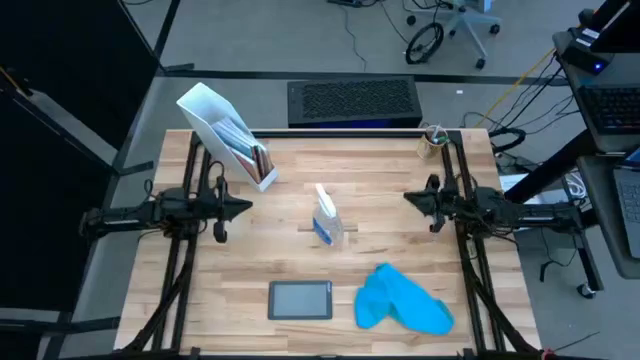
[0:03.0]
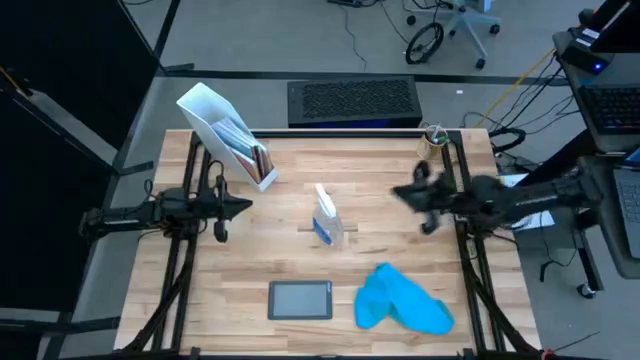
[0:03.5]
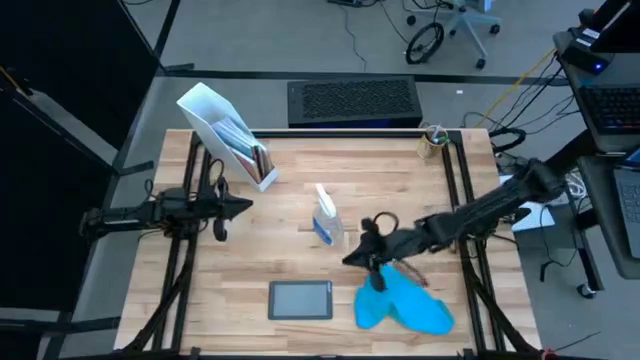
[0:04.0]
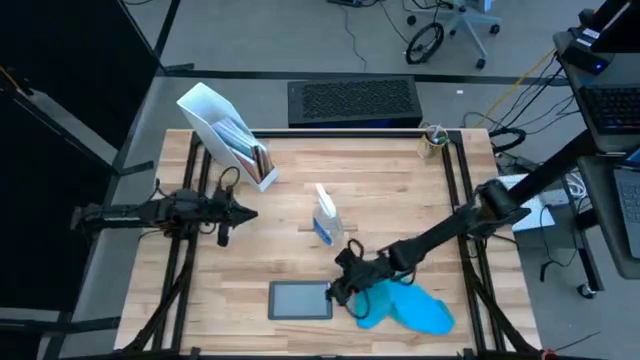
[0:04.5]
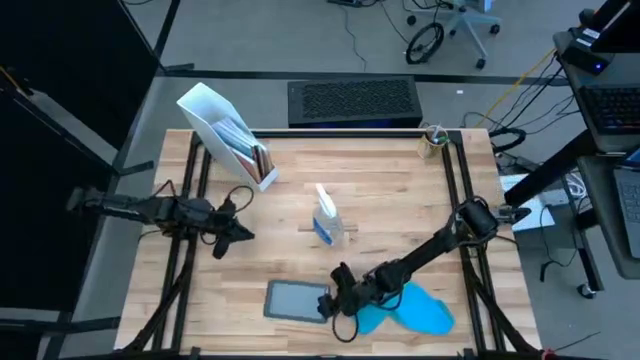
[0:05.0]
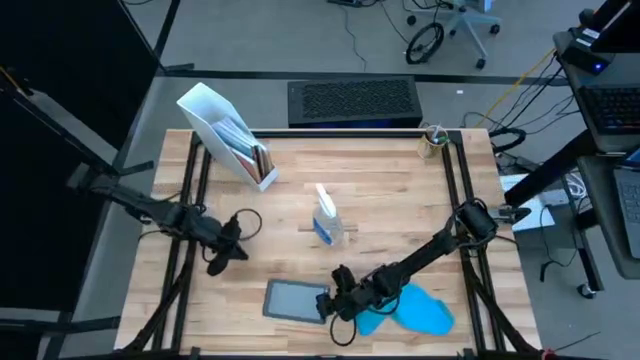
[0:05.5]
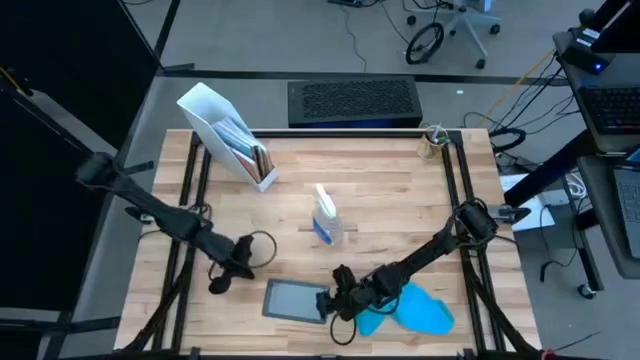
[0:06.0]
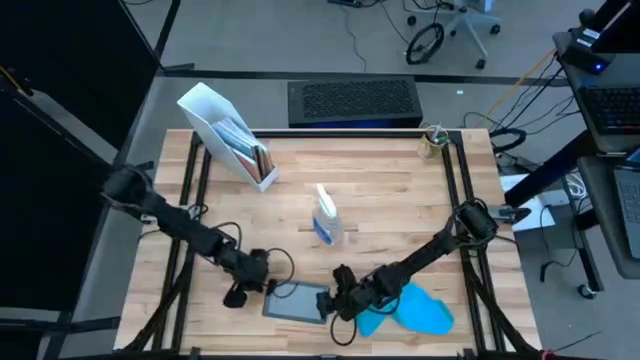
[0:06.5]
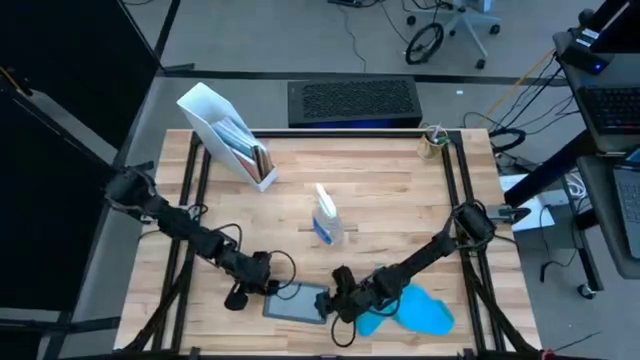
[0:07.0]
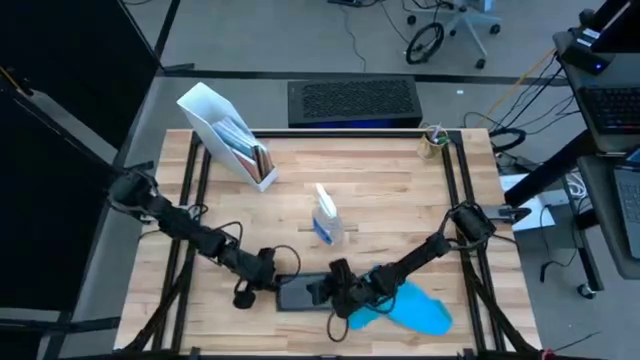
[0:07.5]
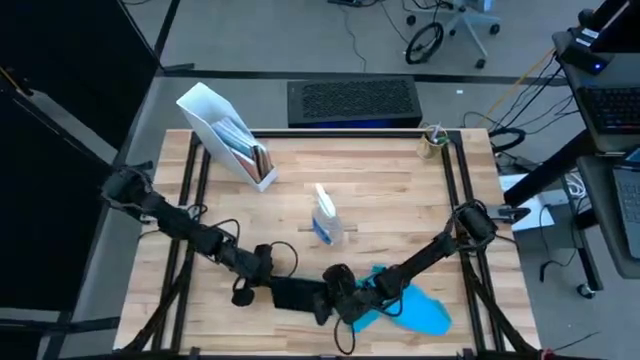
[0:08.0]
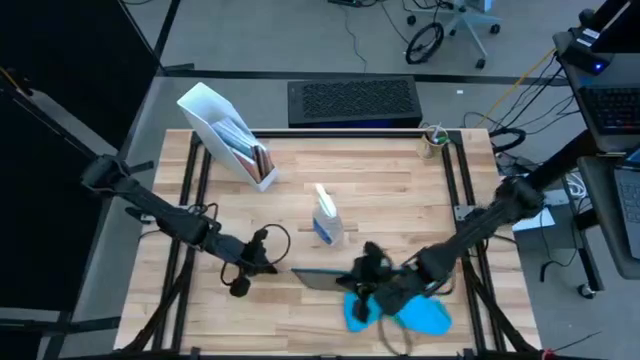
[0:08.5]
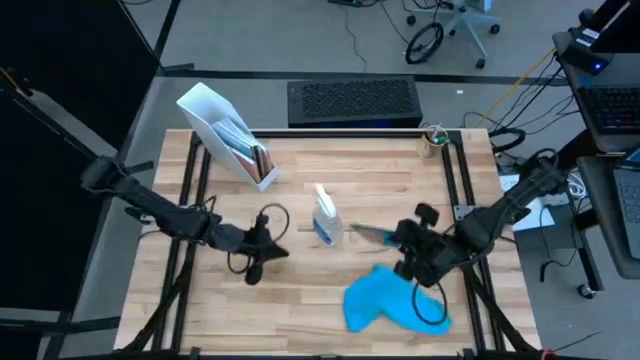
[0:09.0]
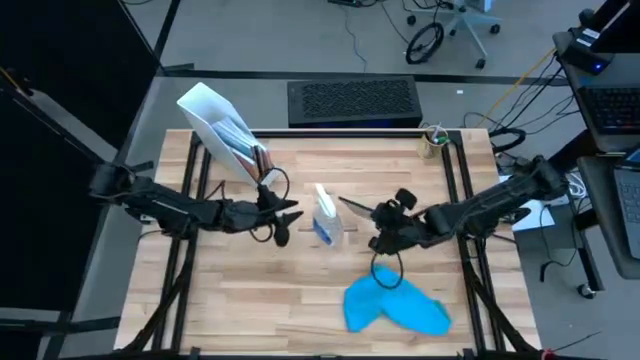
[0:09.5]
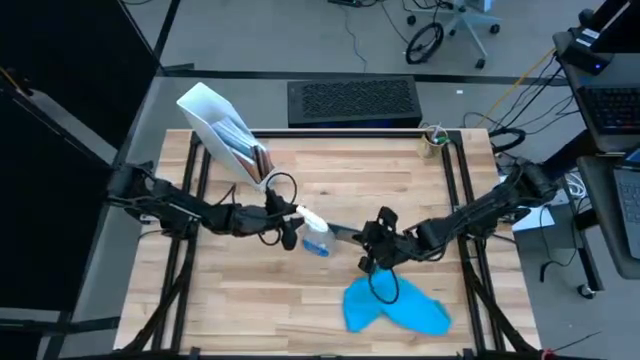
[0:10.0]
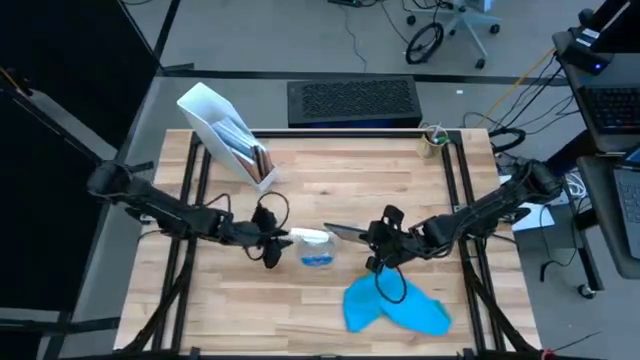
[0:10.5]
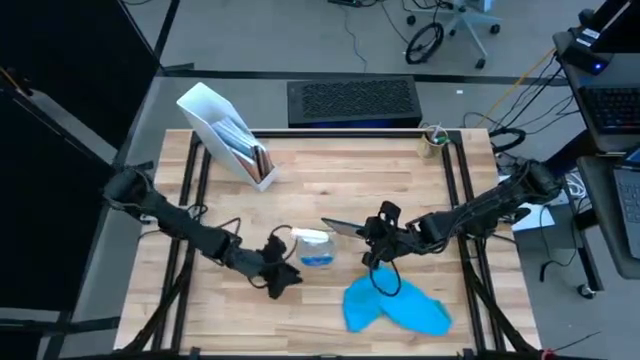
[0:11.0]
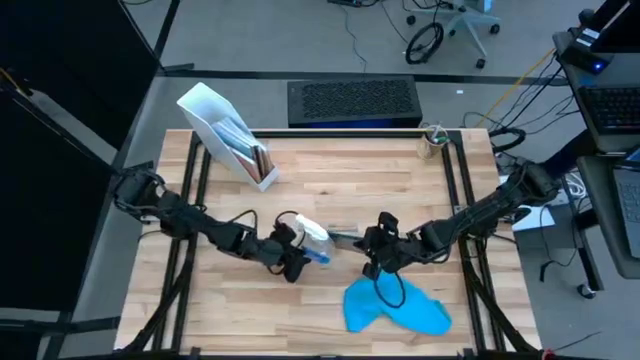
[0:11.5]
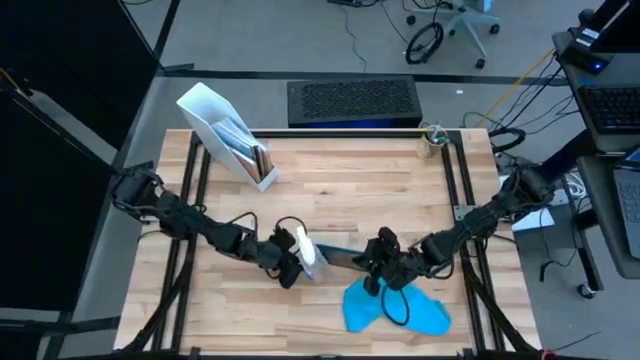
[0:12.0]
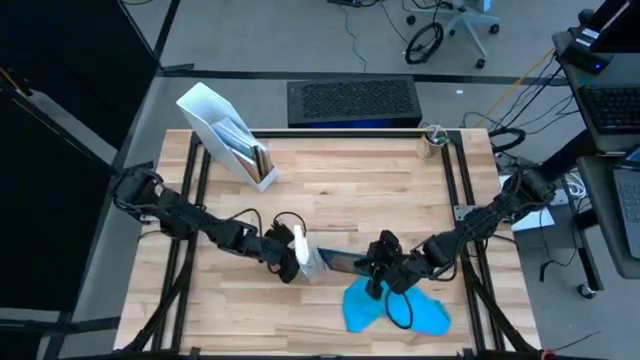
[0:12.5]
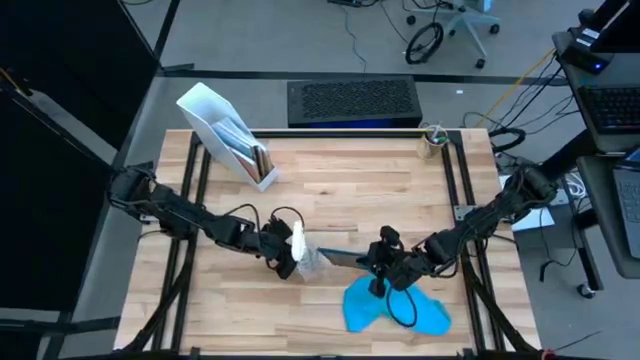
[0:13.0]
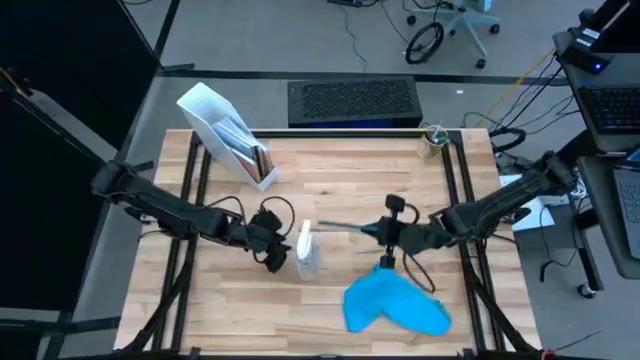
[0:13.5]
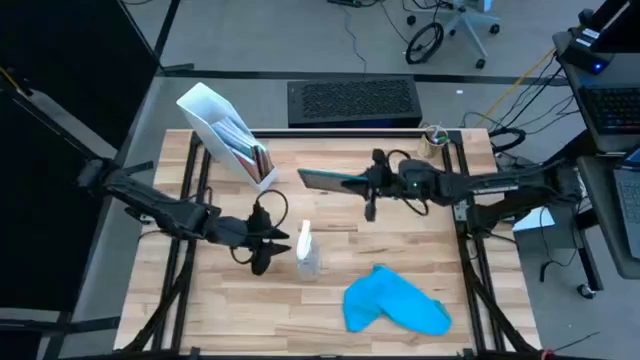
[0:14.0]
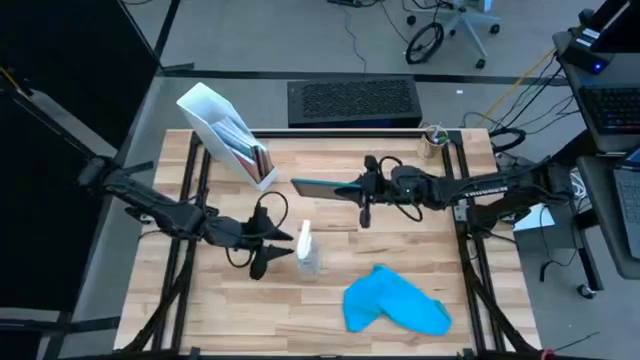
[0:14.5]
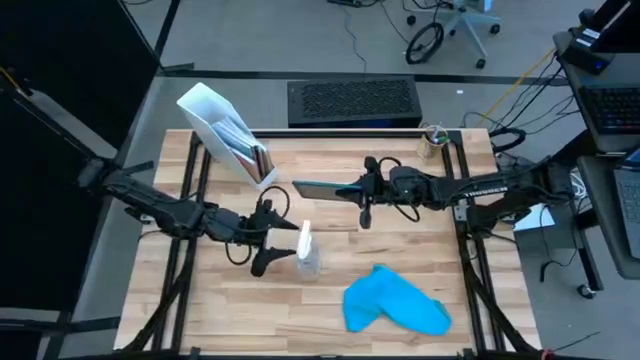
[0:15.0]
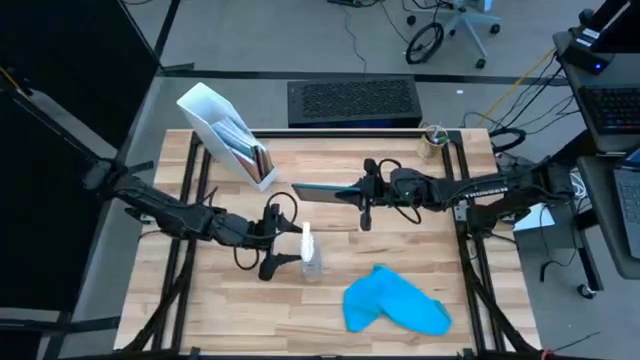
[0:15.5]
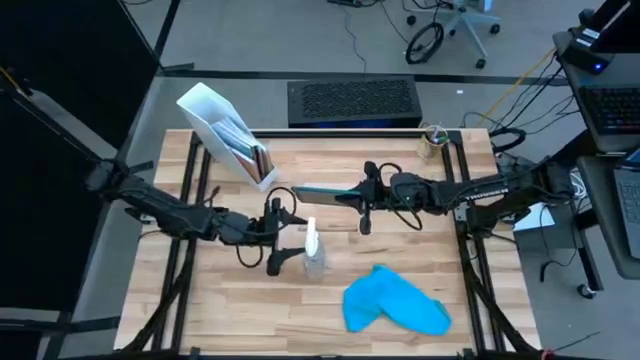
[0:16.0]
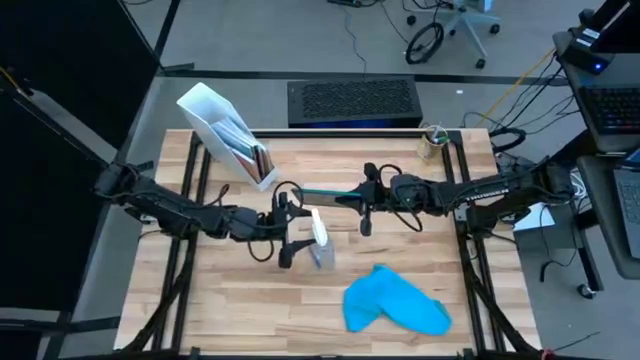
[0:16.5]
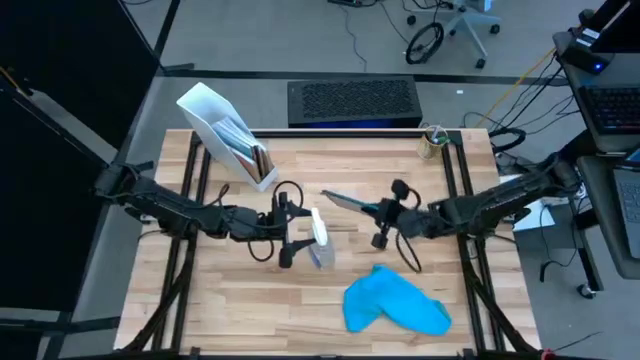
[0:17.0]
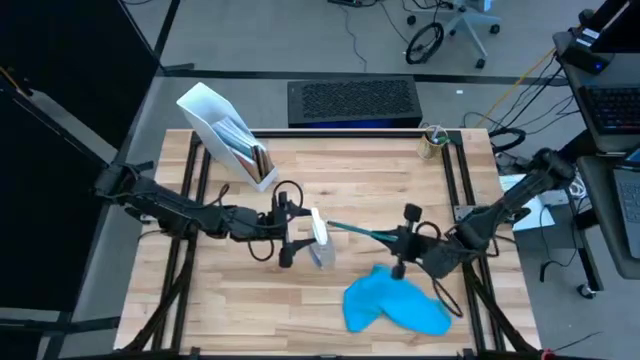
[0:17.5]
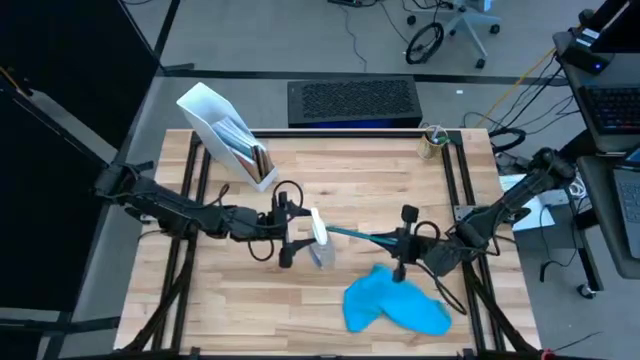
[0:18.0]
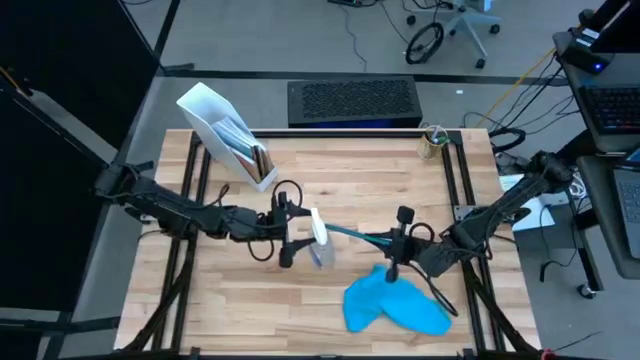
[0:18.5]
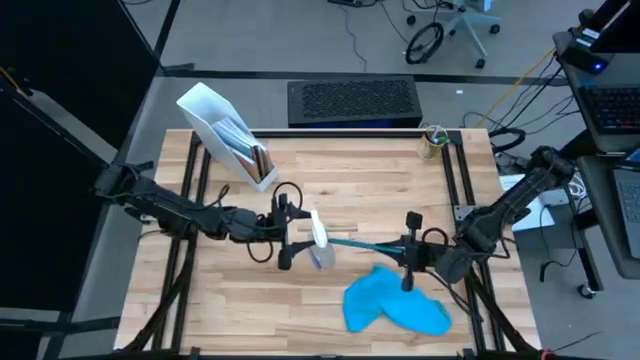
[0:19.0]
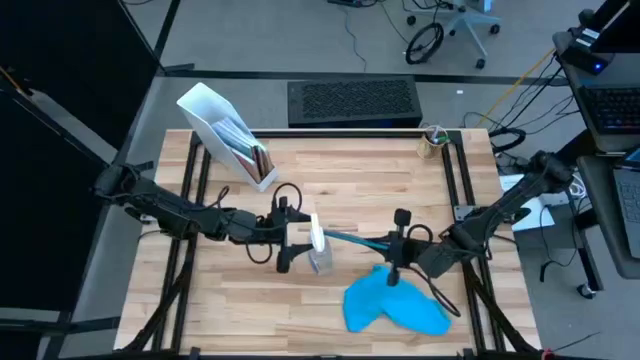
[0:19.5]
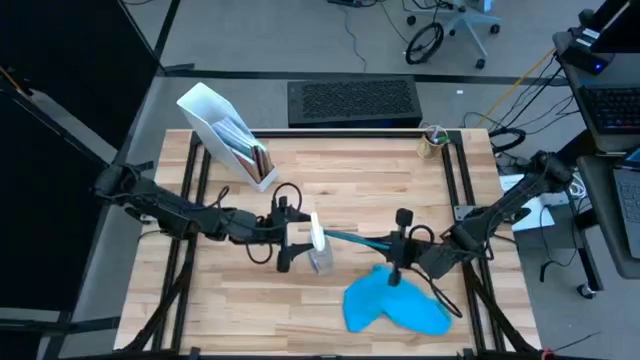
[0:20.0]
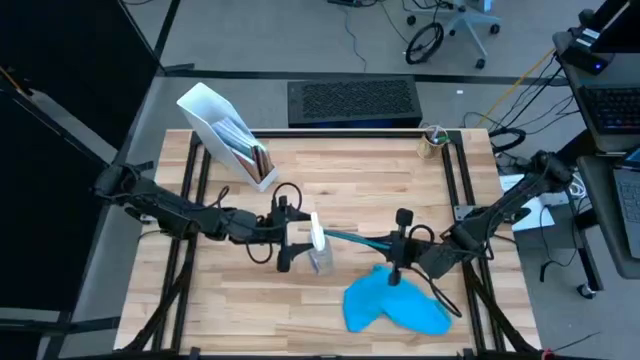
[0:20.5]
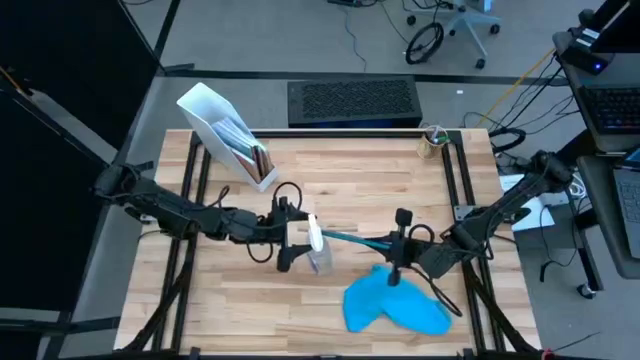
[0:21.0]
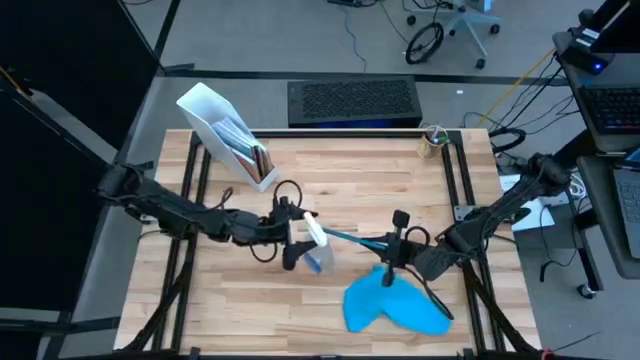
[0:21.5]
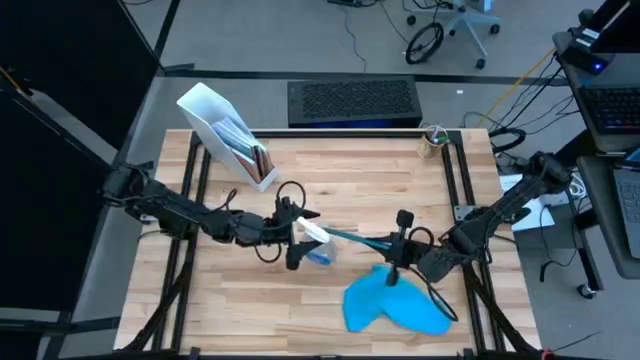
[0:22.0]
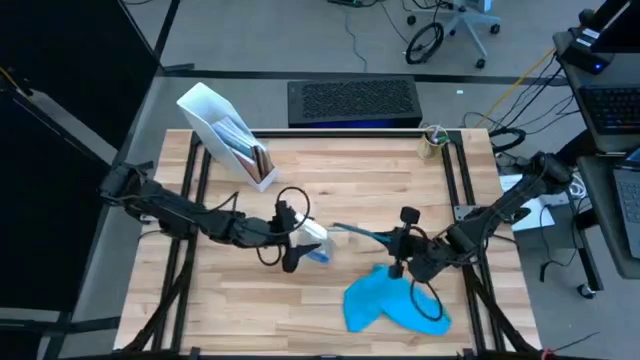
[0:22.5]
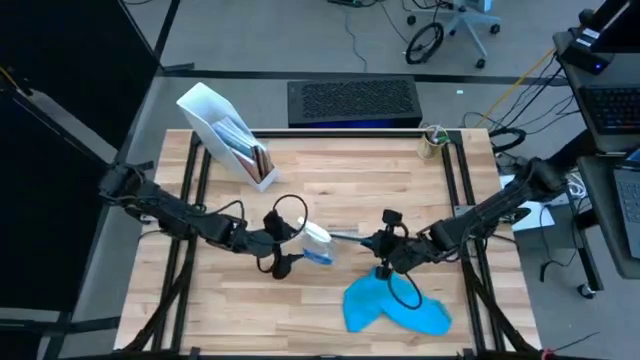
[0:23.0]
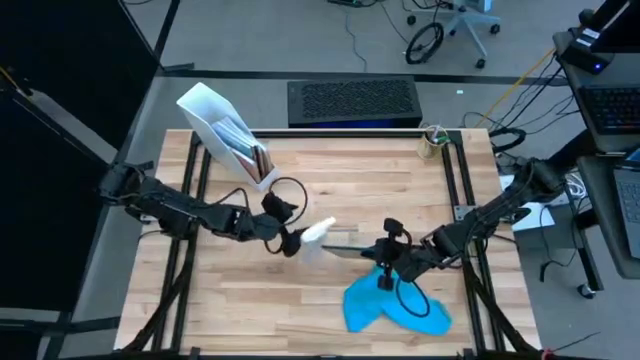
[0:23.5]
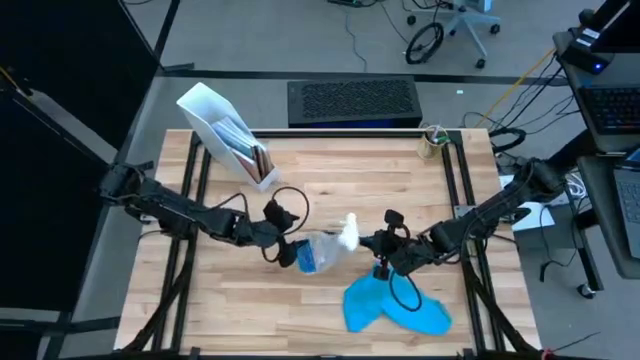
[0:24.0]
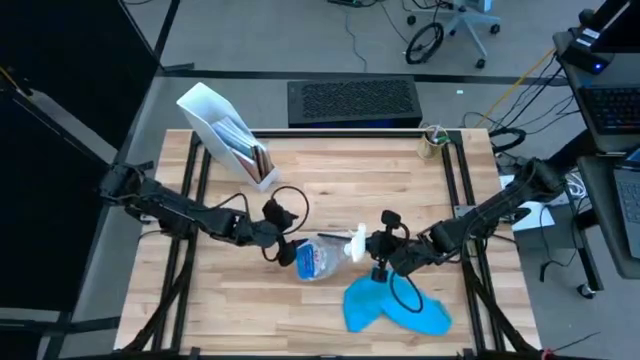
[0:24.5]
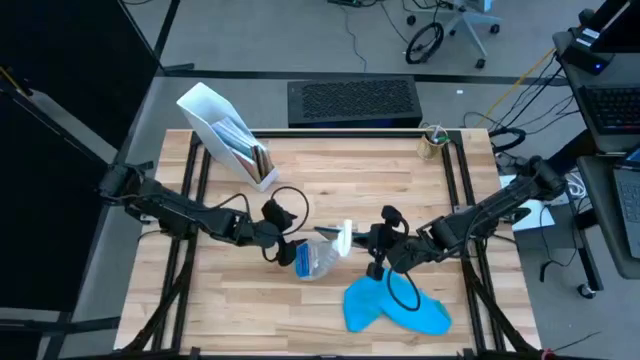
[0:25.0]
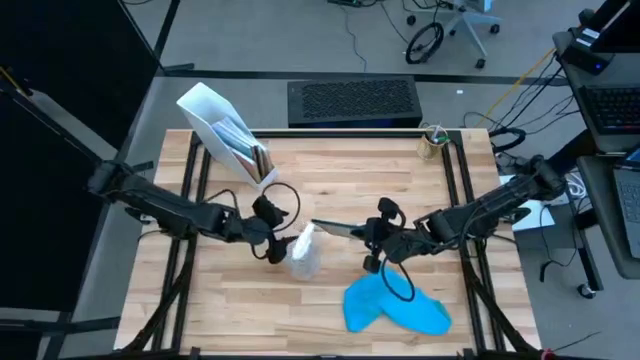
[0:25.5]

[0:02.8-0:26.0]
Task: Apply microfiber cloth
Spray the front of the tablet with the spray cleaning bottle
